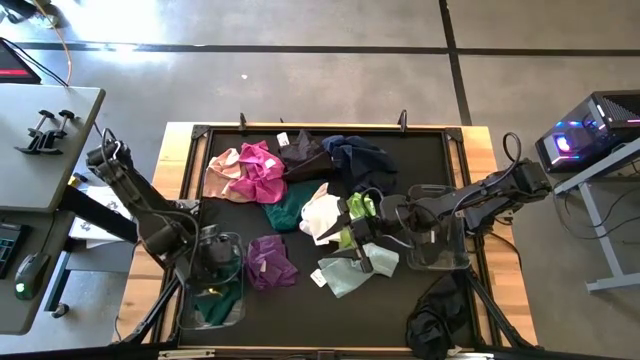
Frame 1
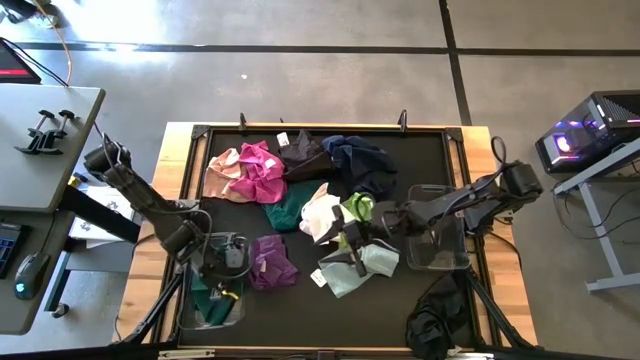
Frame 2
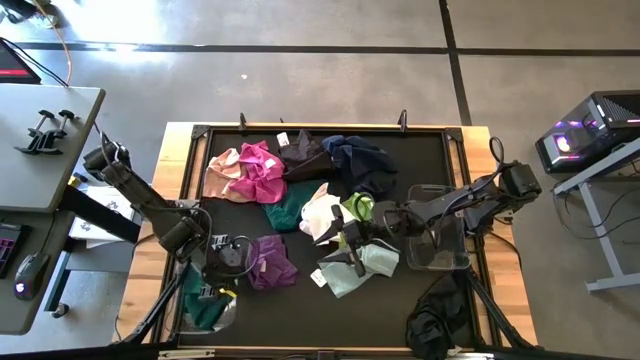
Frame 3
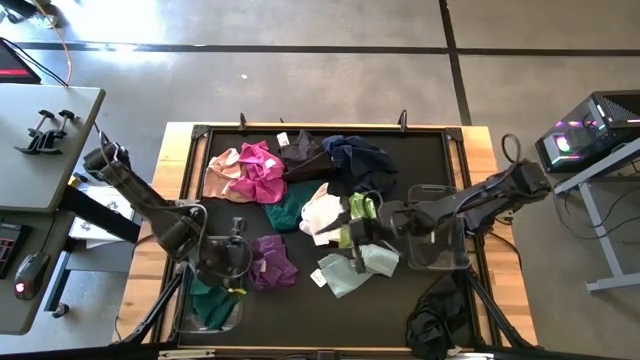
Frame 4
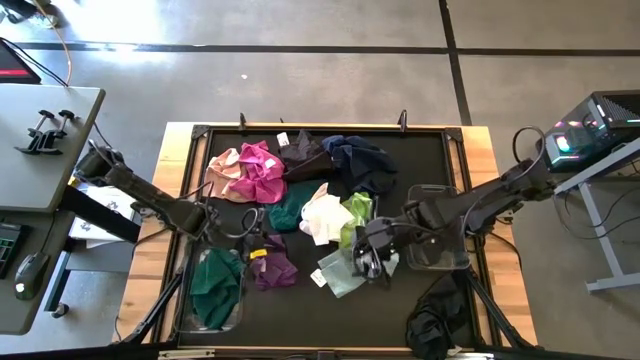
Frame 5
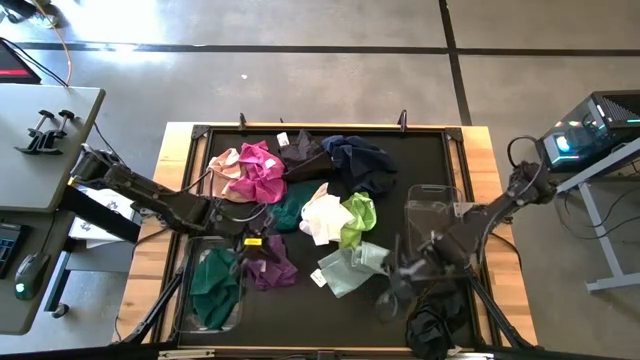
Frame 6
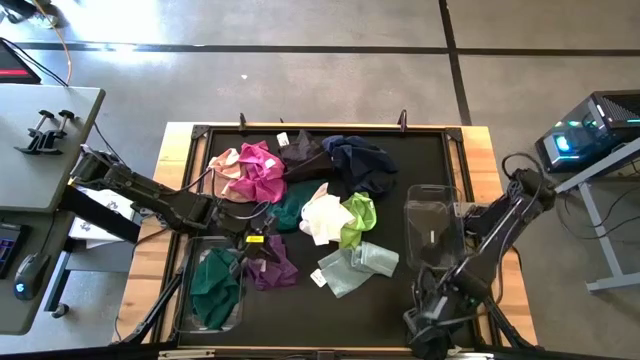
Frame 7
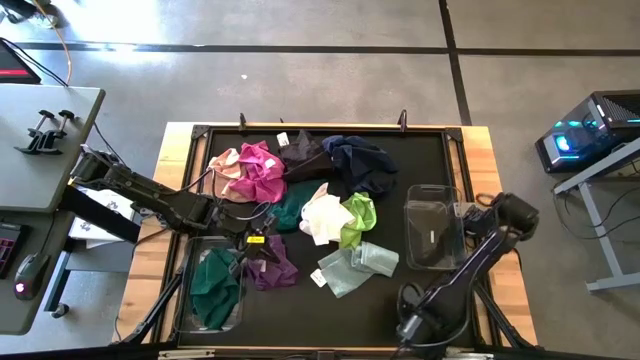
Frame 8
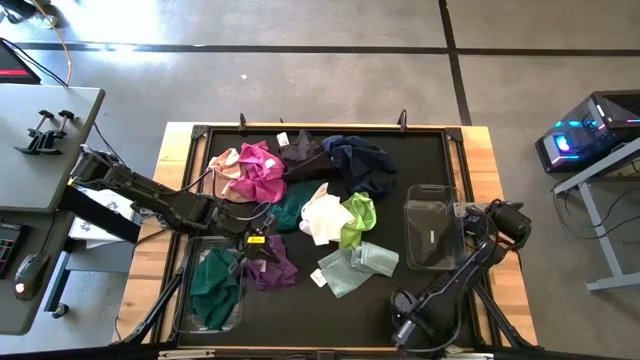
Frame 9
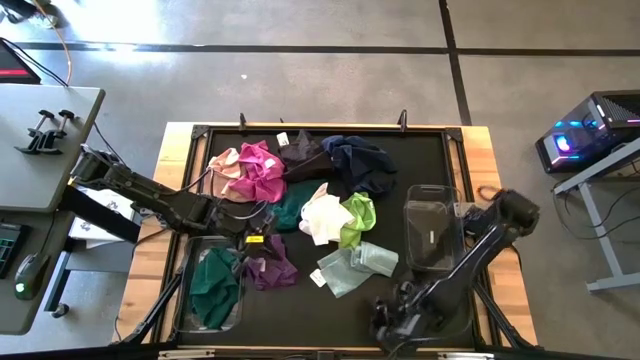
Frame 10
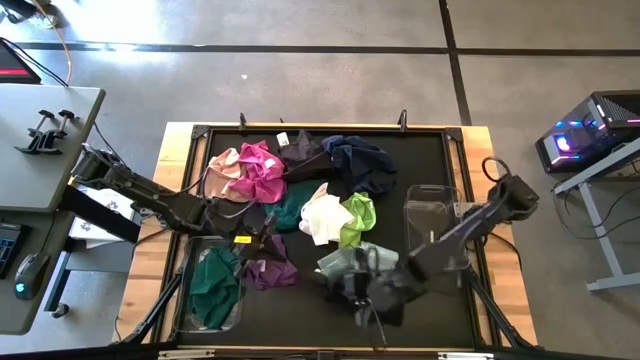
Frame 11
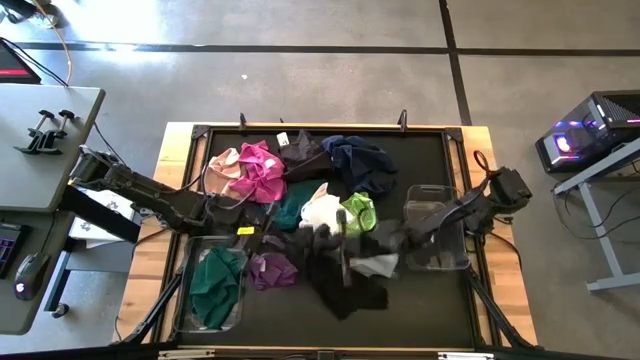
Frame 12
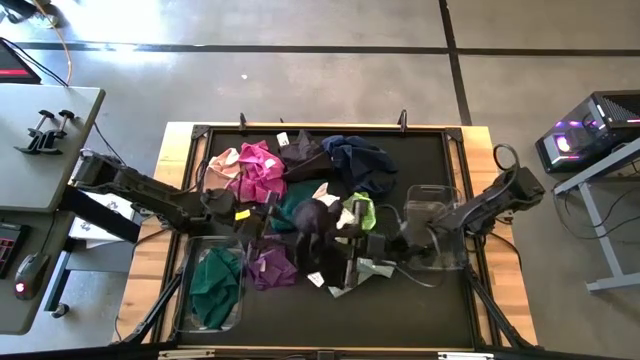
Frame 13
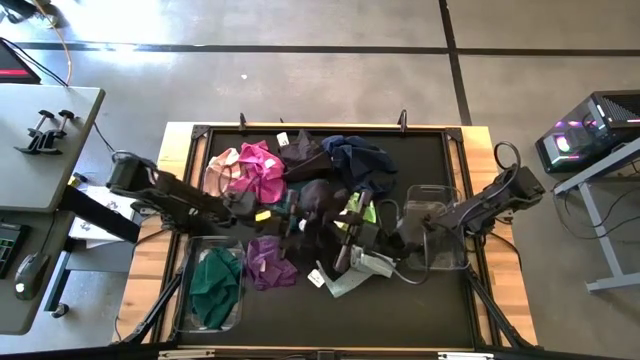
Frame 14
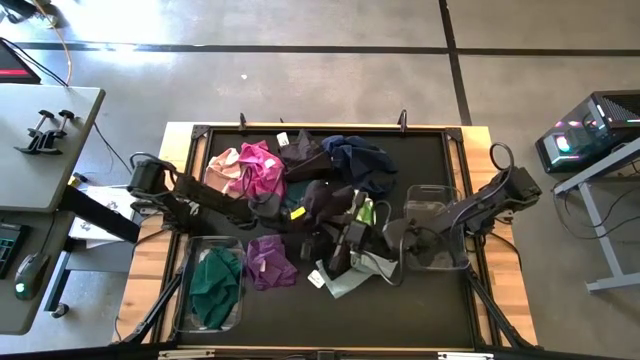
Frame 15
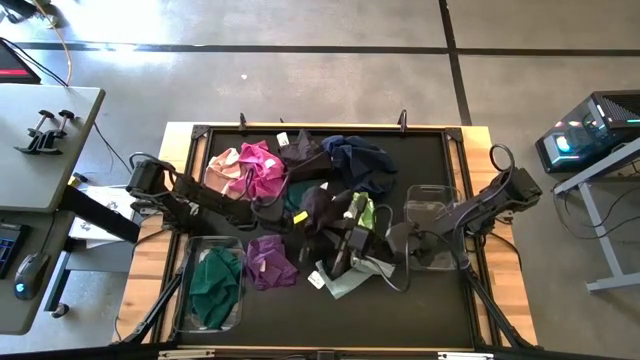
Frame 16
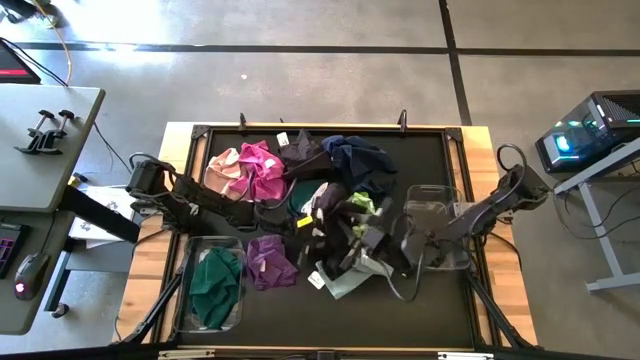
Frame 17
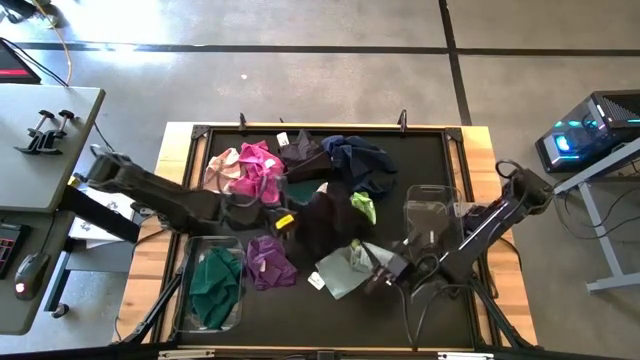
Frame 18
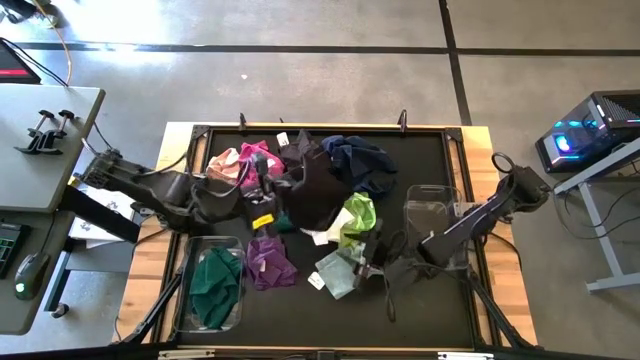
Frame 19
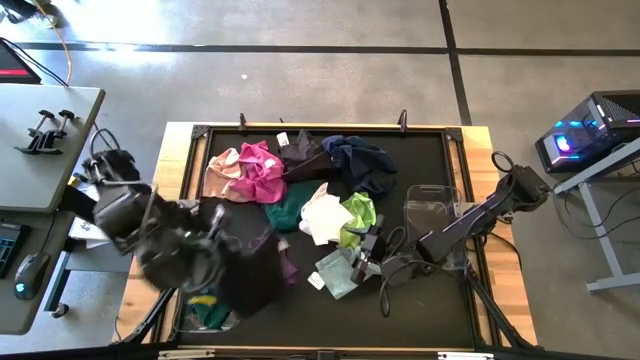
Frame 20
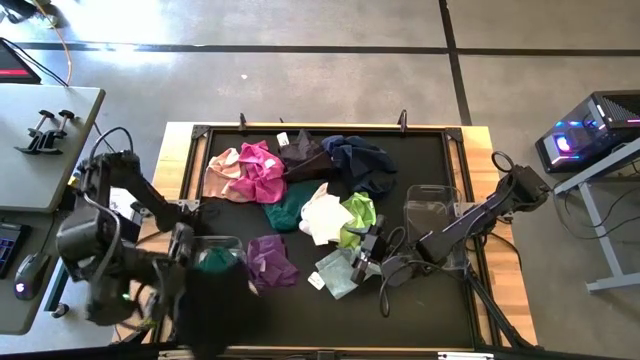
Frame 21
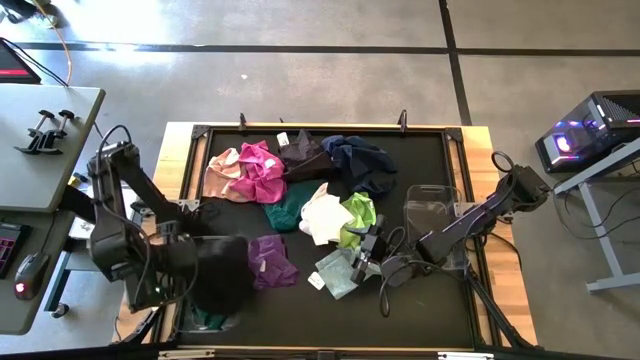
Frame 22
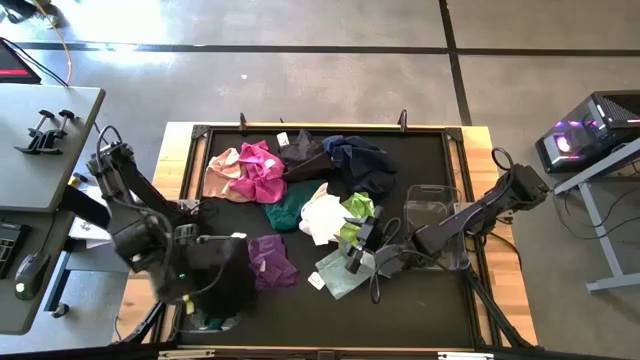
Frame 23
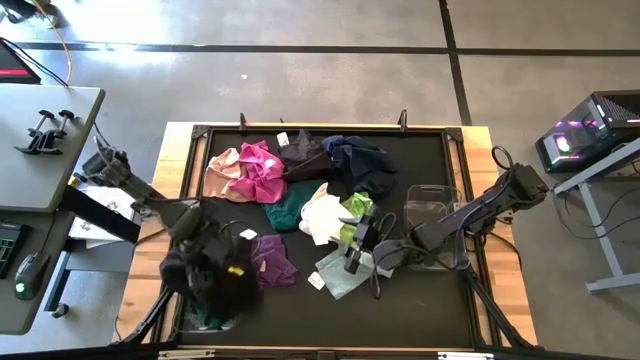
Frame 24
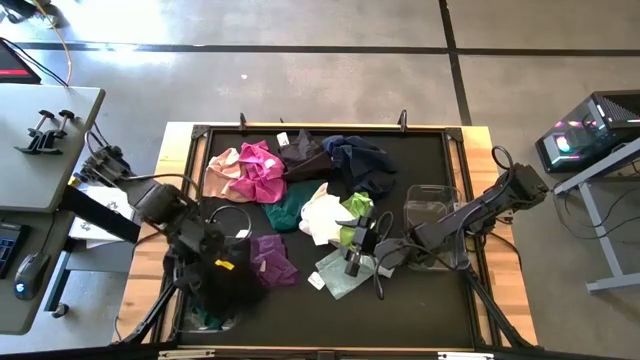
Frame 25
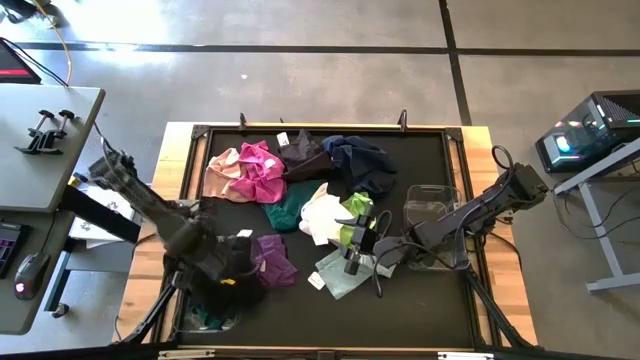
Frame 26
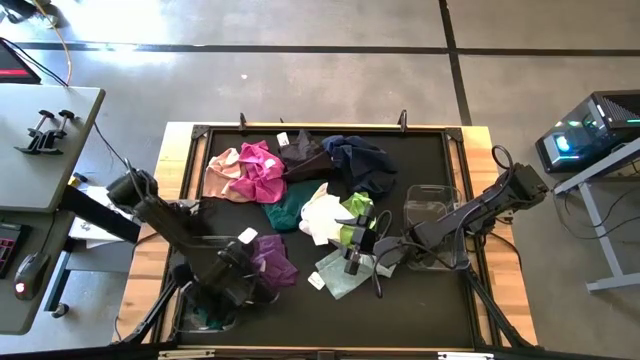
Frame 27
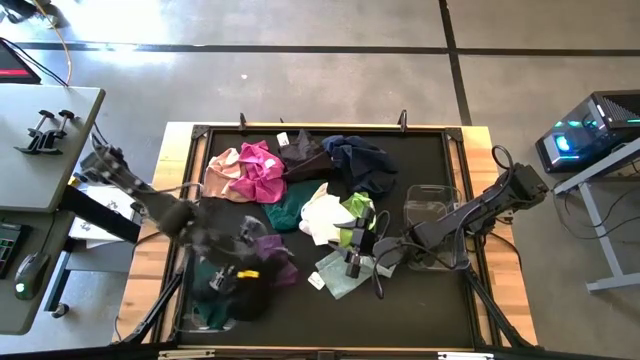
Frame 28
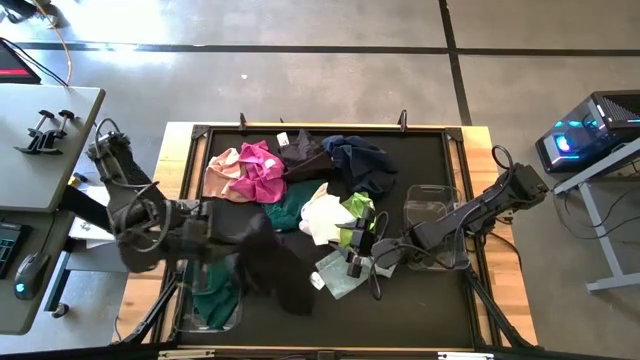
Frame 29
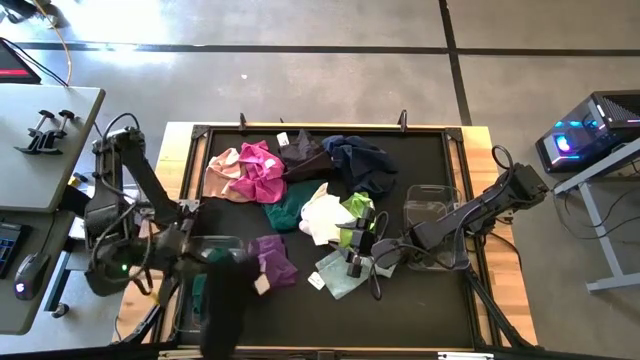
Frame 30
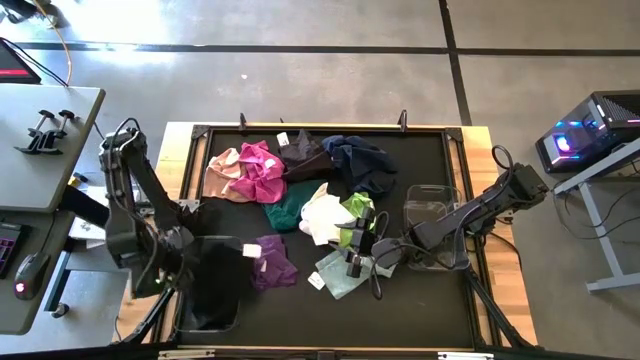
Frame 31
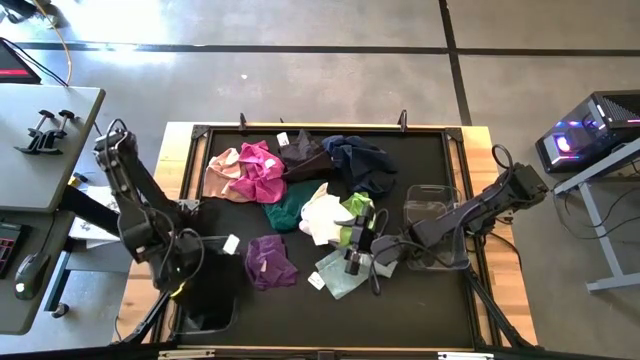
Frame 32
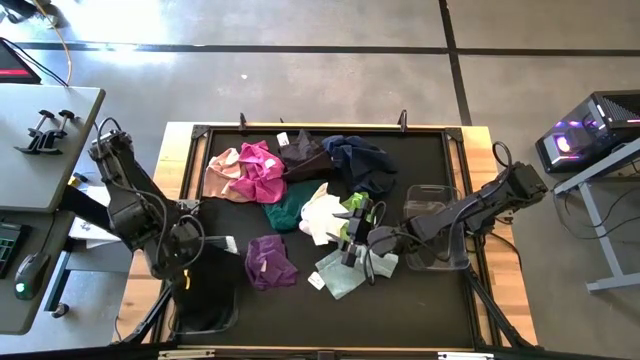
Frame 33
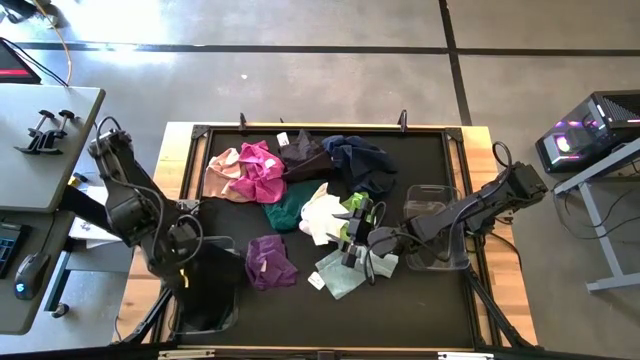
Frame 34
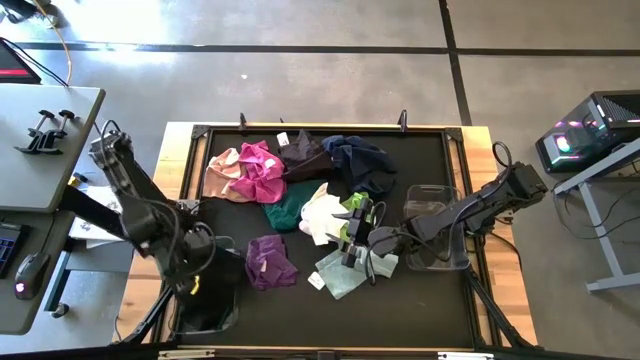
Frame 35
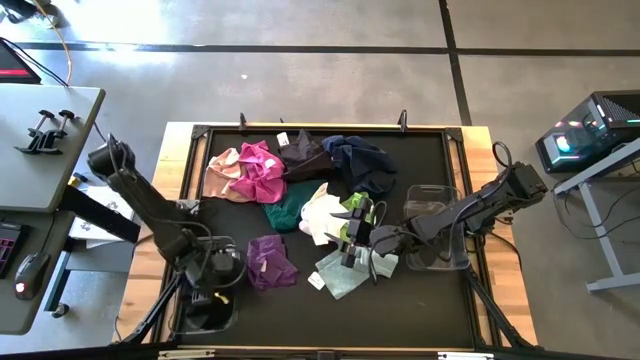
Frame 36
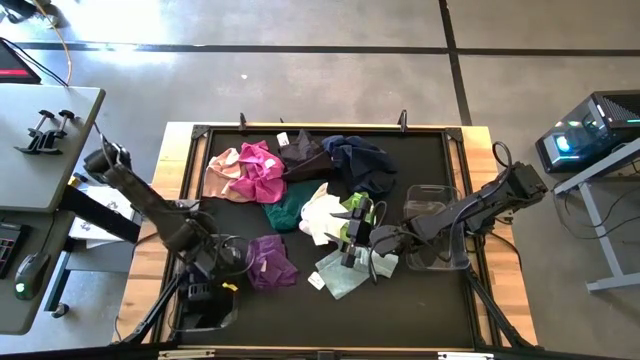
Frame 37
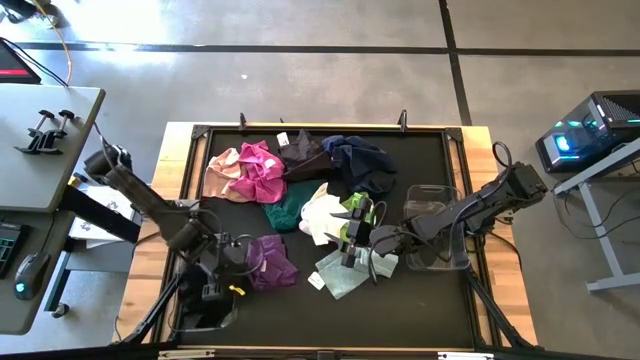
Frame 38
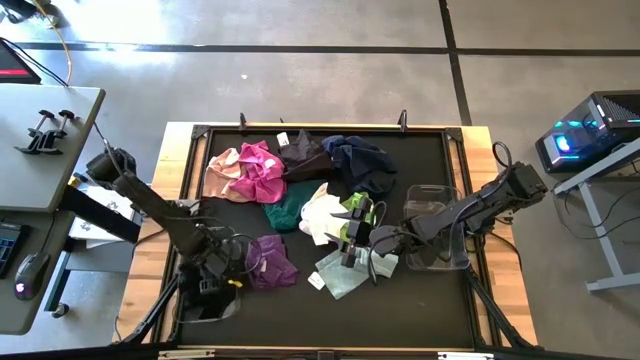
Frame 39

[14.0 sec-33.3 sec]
Task: Sort towels by color in basket
Put the bottom black towel into the left transparent bin

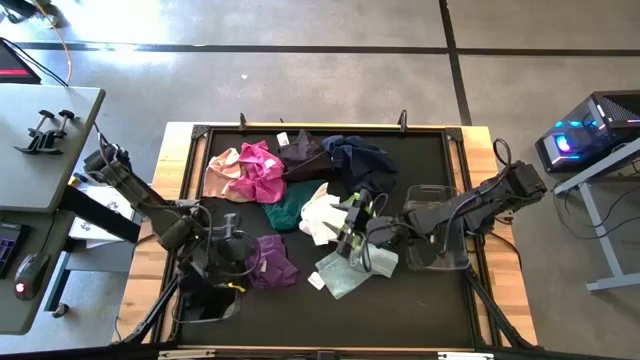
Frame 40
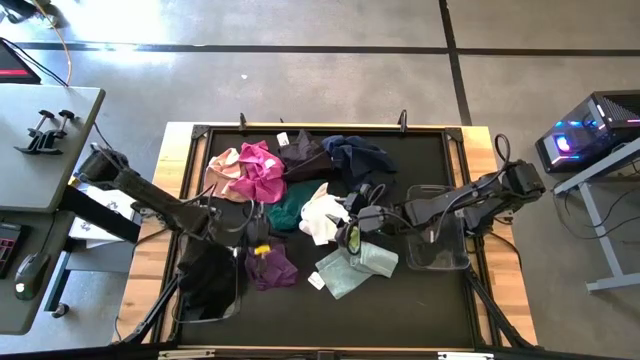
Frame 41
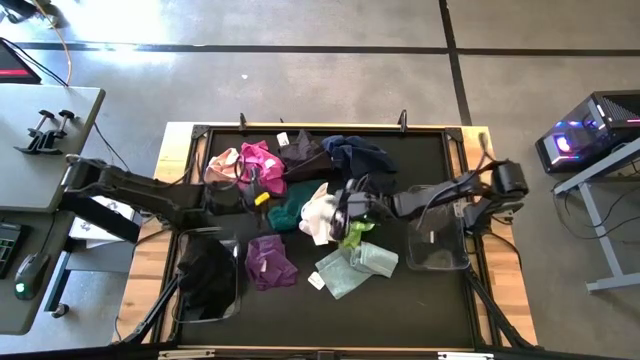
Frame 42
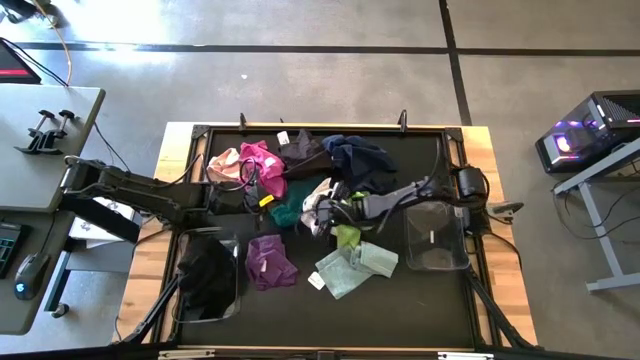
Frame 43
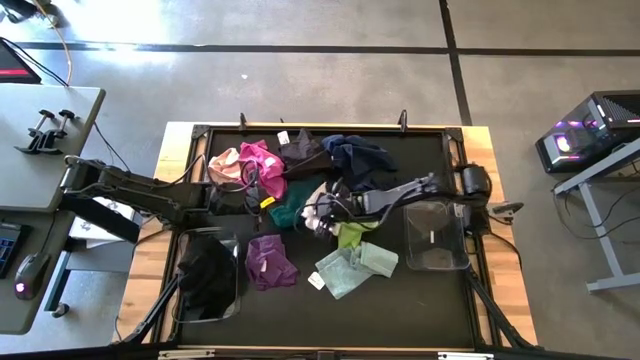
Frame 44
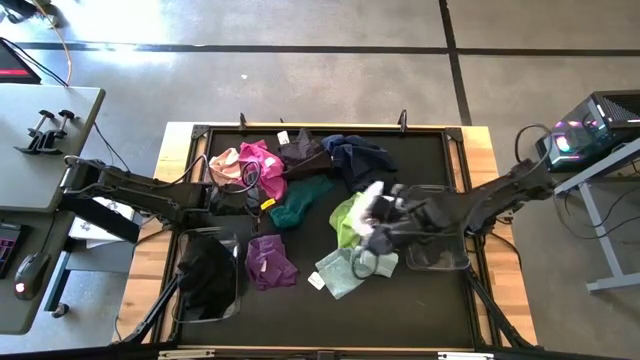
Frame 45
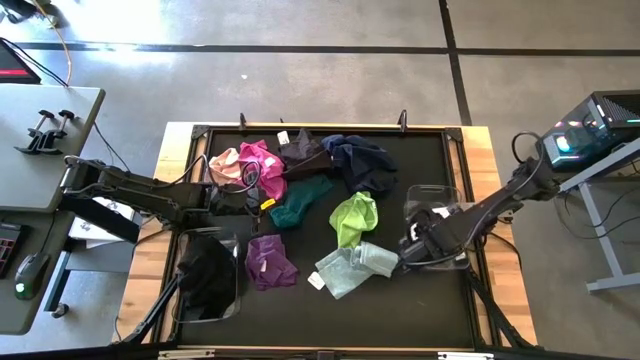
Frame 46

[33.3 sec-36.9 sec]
Put the white towel into the right transparent bin
